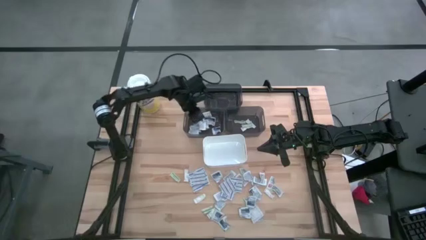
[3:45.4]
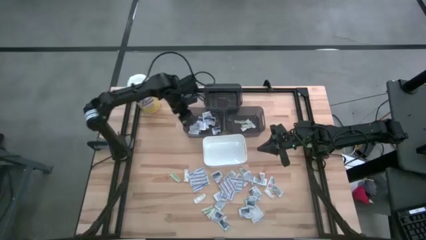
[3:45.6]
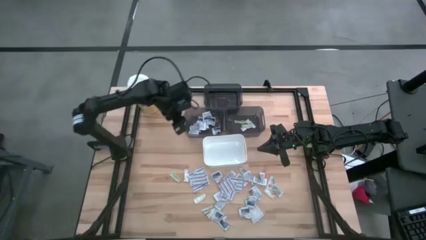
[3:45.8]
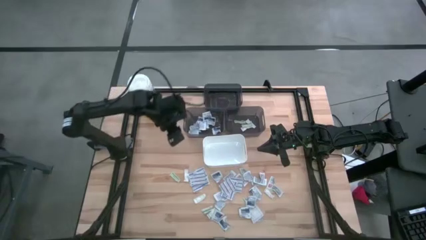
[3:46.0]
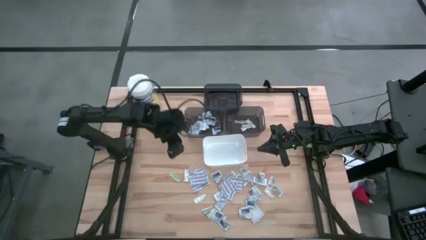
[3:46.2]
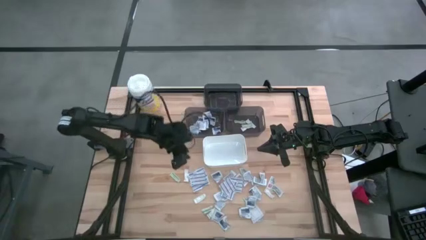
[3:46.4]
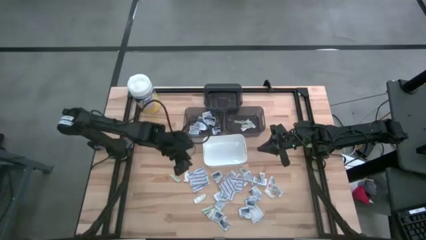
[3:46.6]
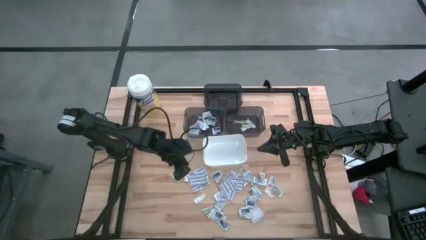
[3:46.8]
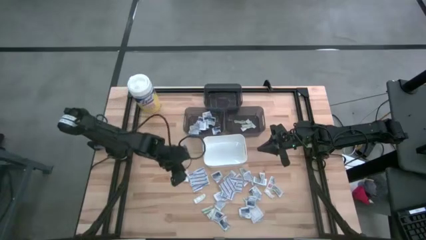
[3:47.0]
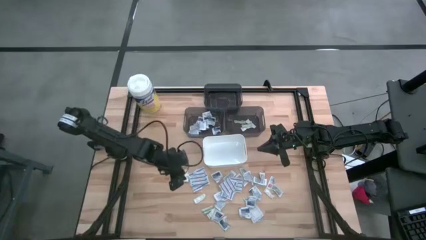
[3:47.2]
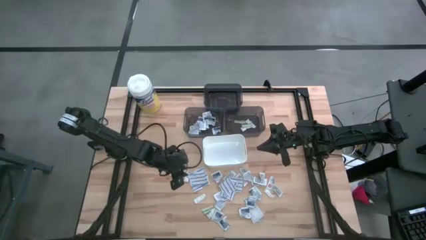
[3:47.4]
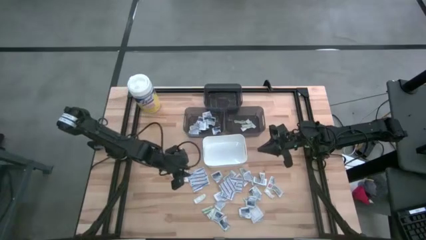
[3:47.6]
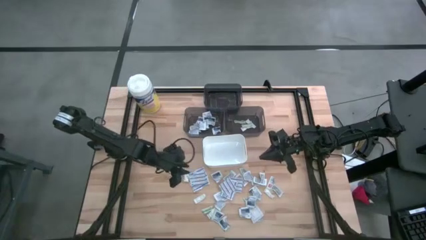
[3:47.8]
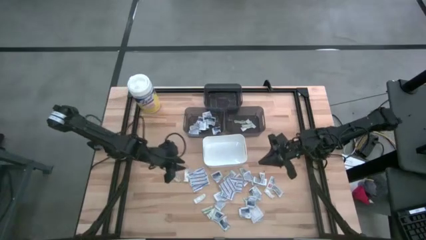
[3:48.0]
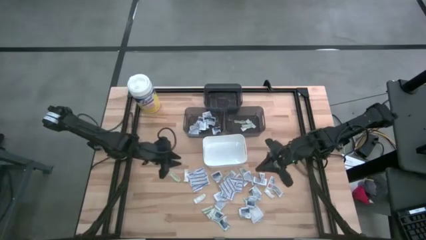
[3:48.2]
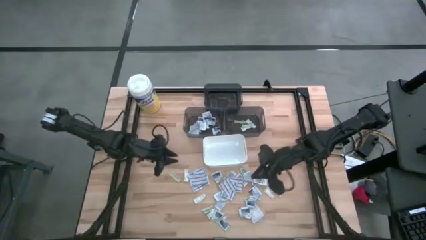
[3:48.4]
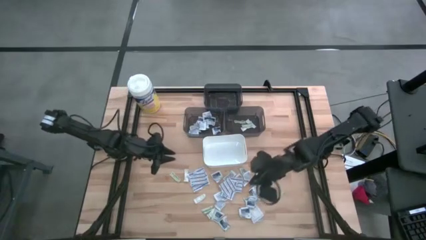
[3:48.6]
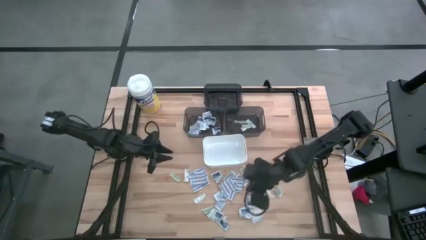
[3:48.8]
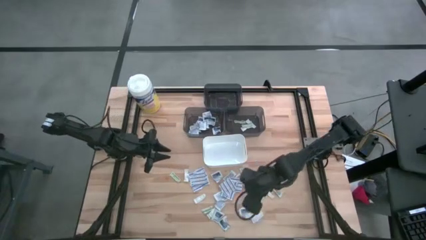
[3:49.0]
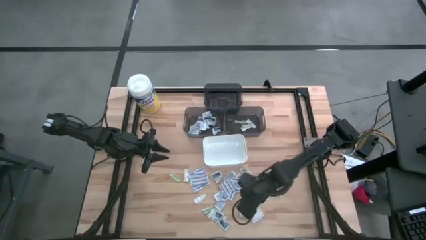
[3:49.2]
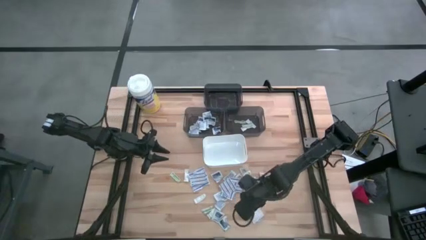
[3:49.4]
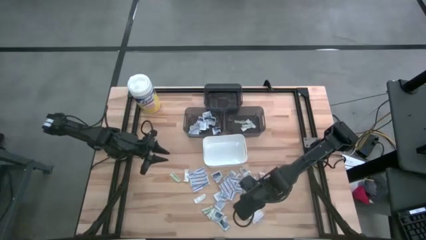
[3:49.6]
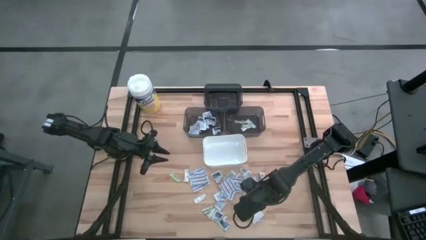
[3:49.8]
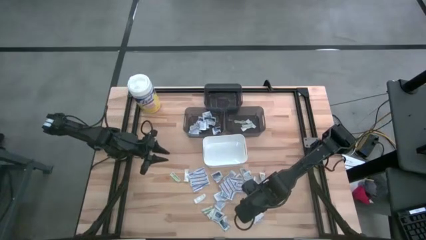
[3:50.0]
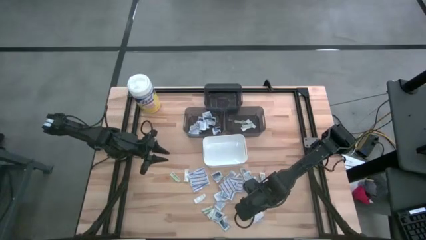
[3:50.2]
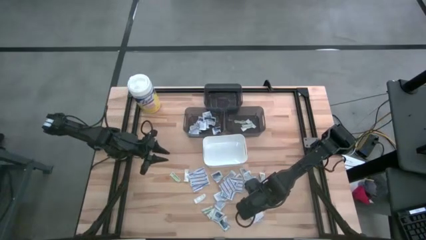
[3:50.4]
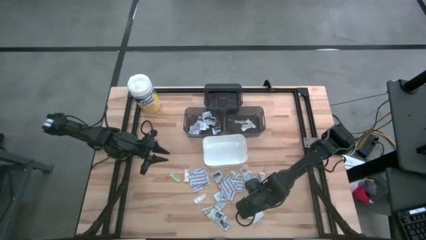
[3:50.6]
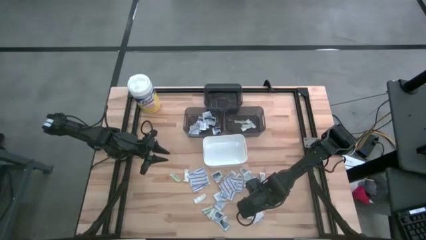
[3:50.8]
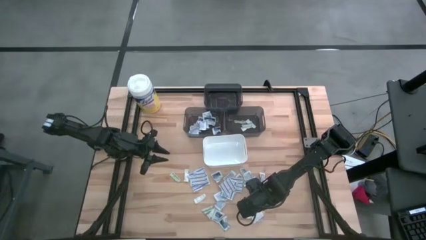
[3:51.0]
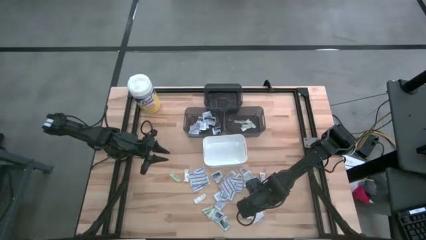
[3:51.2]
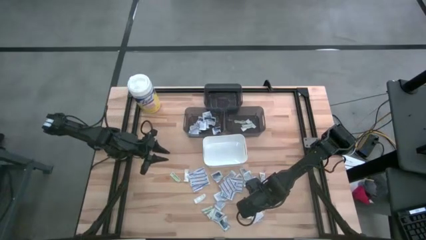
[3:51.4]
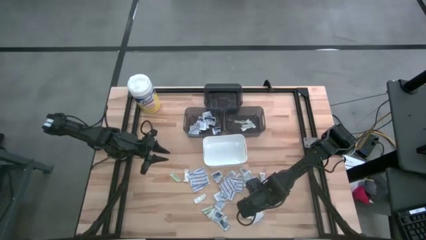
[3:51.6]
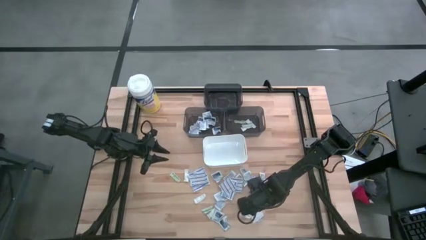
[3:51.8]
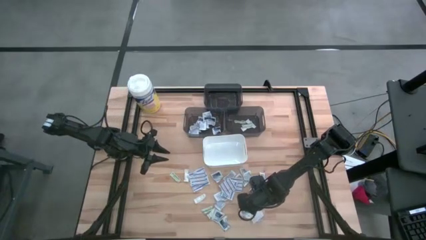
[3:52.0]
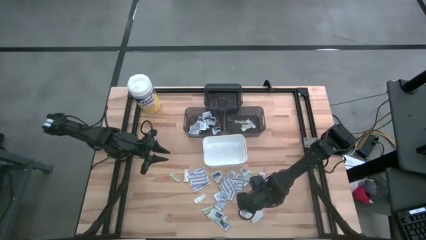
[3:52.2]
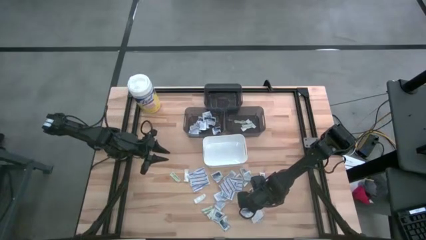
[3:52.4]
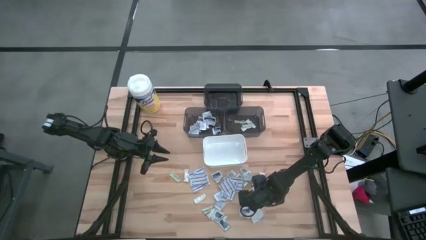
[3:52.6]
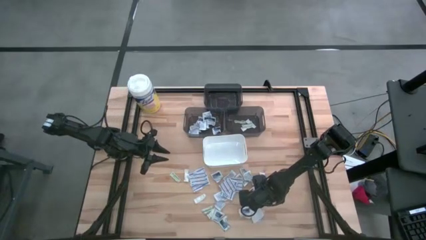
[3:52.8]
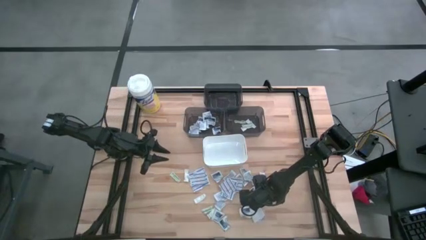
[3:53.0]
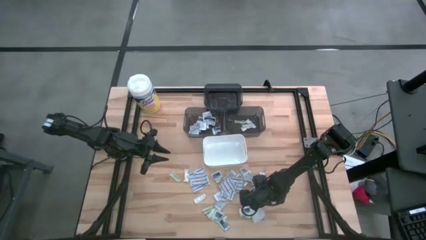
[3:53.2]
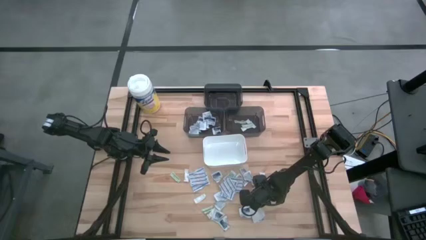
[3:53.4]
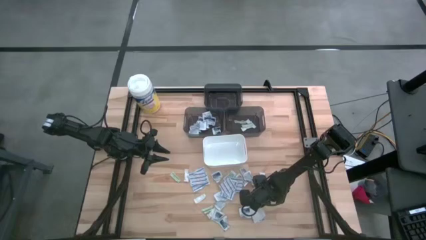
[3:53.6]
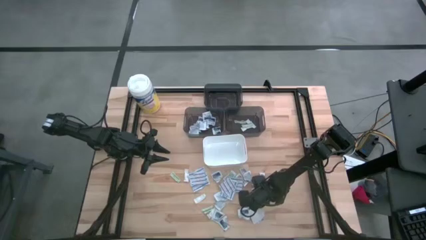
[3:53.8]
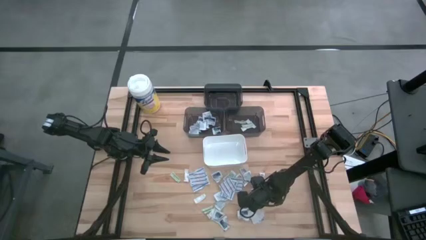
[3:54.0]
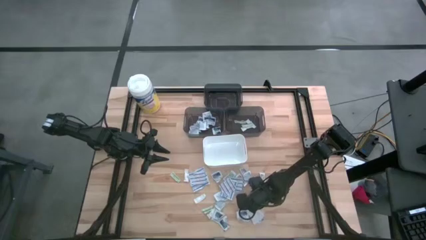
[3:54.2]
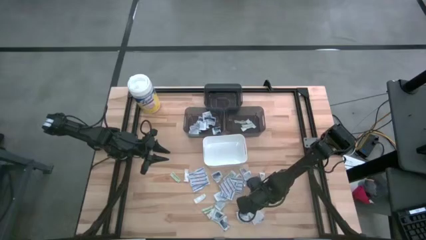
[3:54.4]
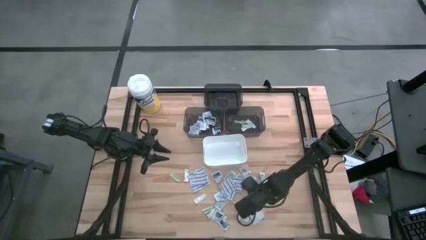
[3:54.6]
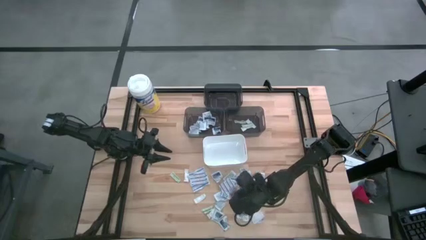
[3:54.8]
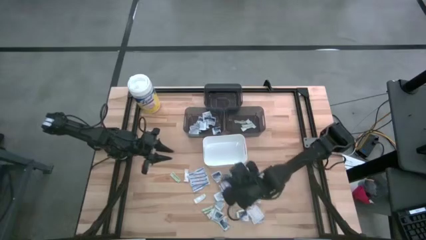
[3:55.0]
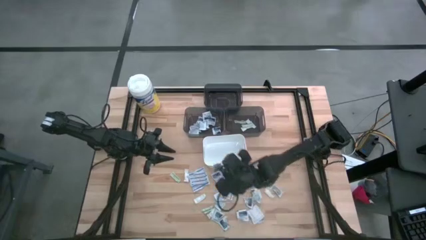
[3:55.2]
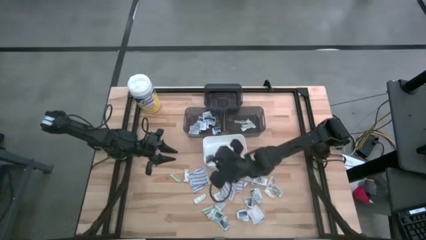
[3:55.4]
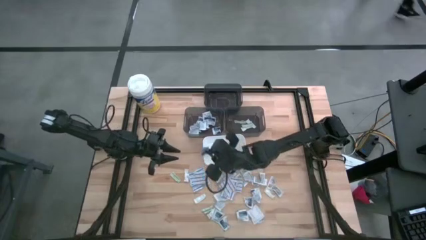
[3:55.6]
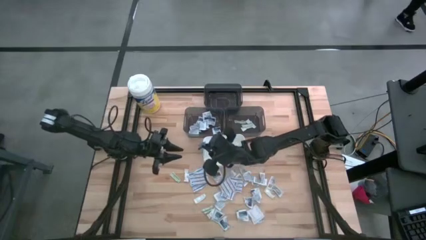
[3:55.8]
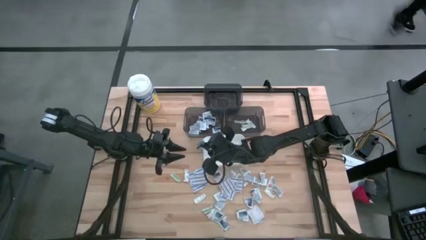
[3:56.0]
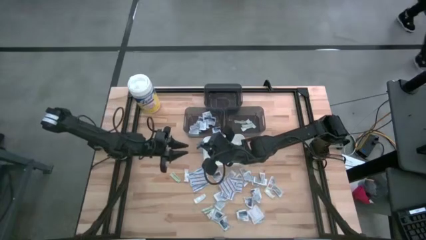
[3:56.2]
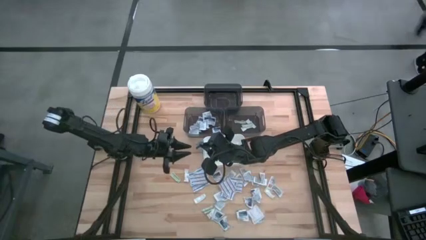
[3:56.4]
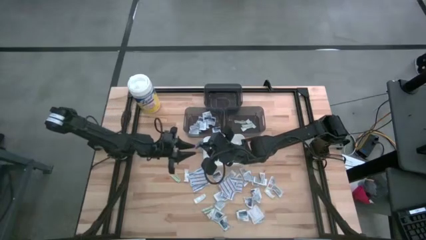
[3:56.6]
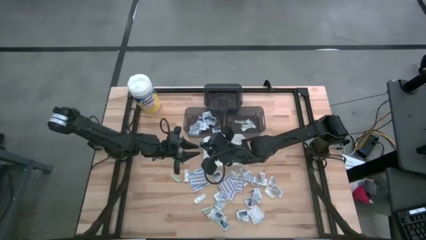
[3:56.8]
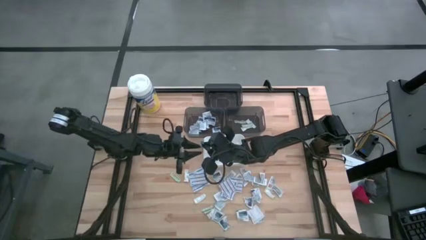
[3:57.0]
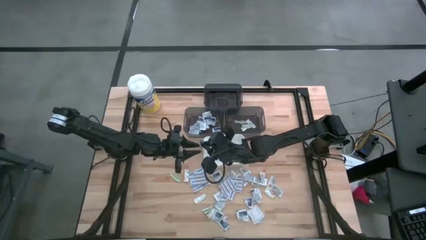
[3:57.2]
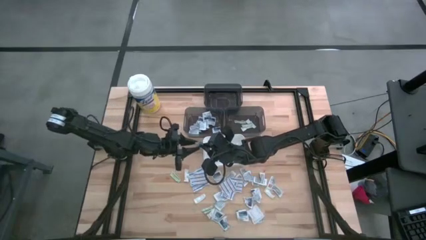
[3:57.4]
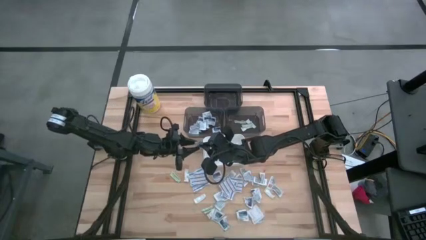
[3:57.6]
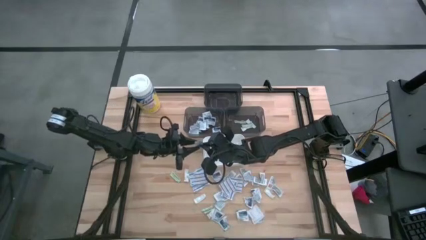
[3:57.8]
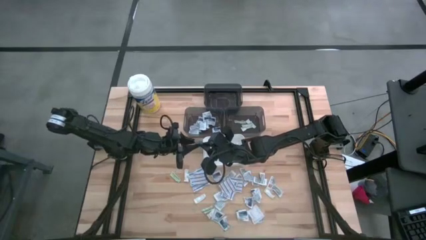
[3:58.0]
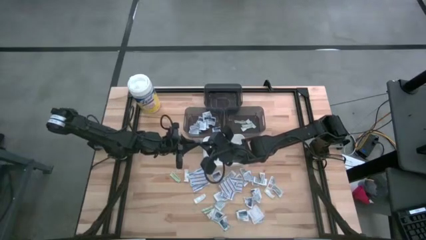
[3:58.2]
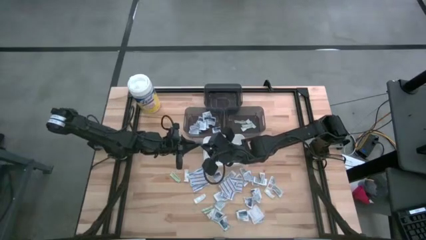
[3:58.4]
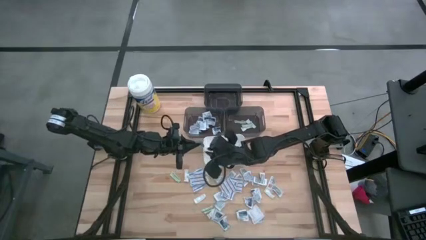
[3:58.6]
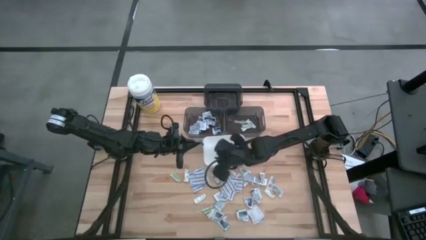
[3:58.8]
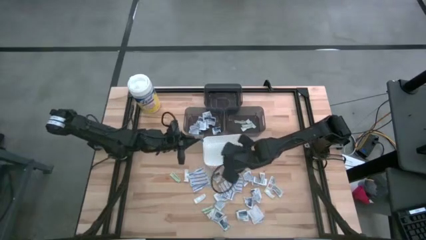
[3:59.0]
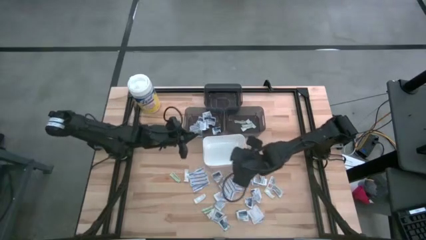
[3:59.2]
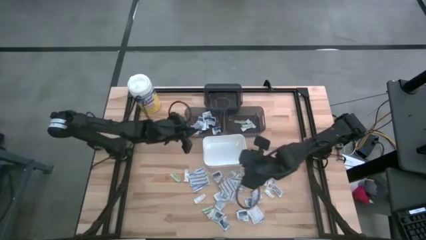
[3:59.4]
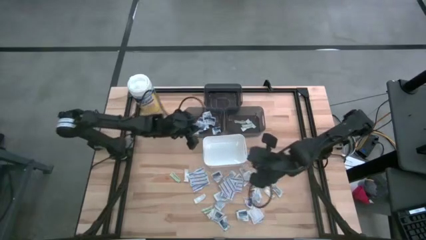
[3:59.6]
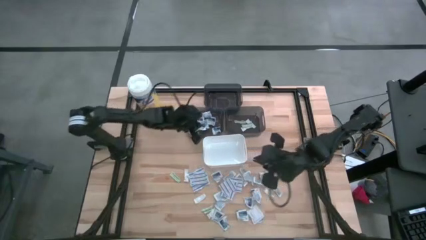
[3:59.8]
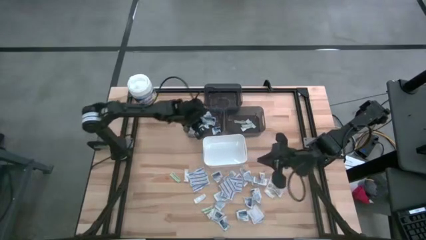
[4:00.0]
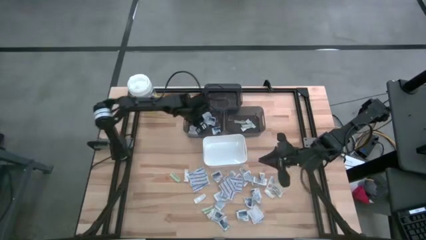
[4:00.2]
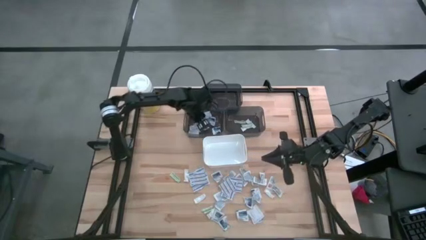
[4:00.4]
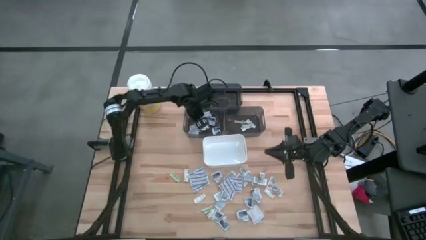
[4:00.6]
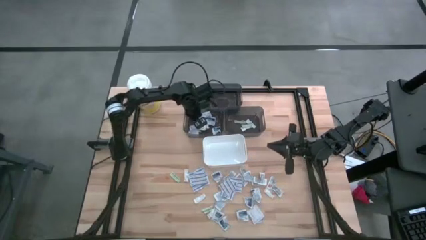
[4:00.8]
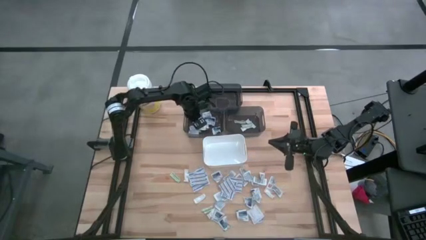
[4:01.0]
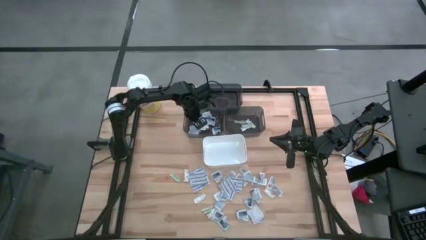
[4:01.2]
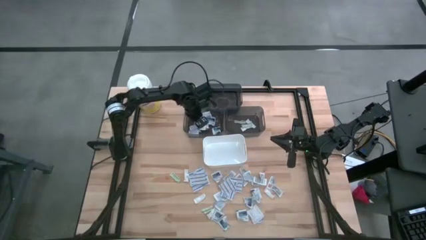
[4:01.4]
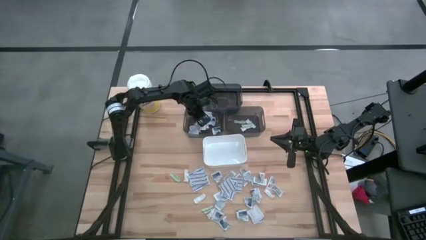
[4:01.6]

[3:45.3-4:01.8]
Task: Pick & Place First Aid Supplies
Put the alcohol pad into the bottom left black bin
